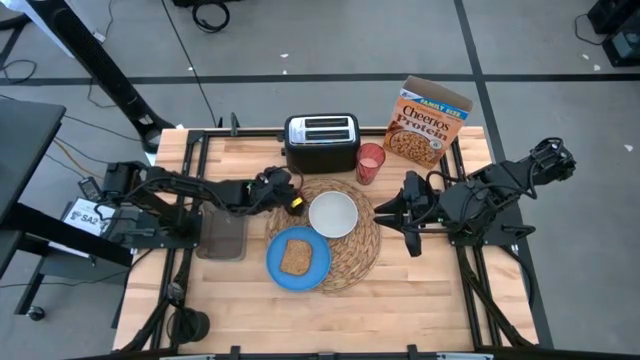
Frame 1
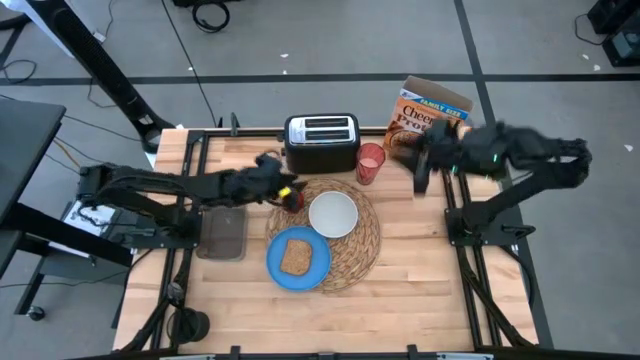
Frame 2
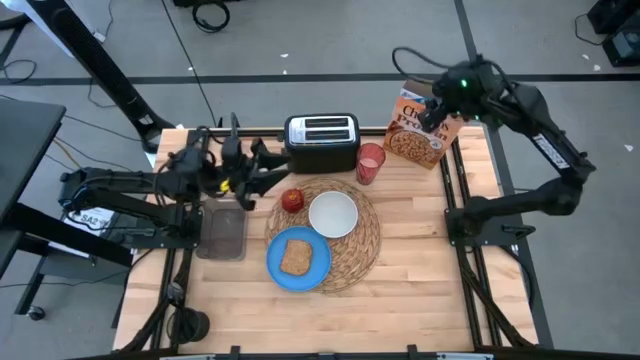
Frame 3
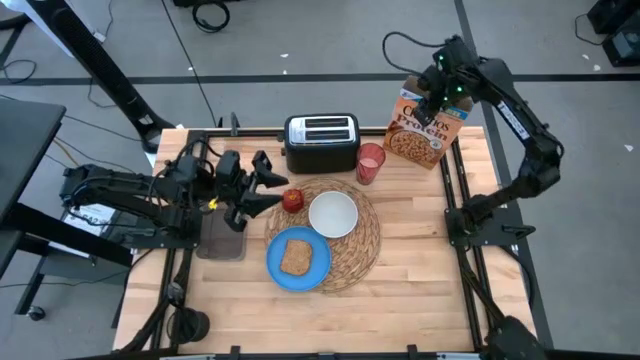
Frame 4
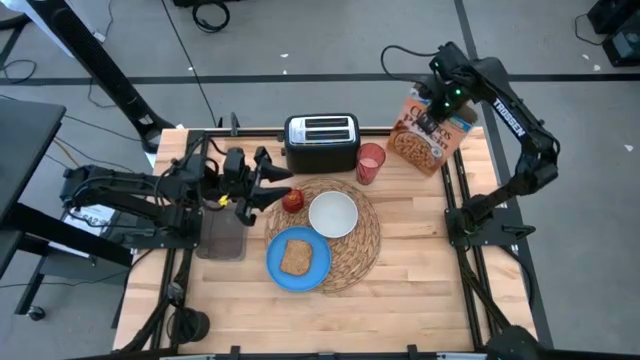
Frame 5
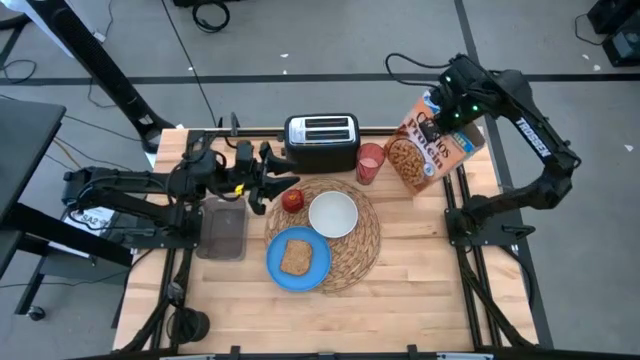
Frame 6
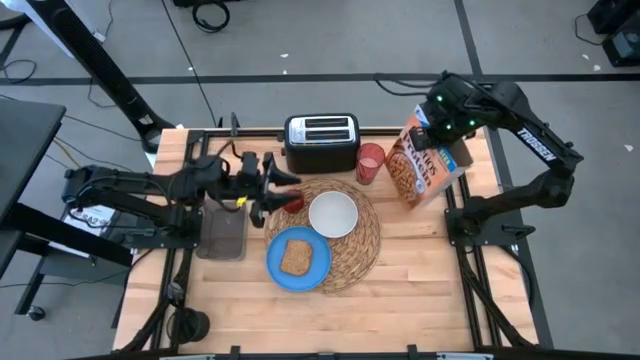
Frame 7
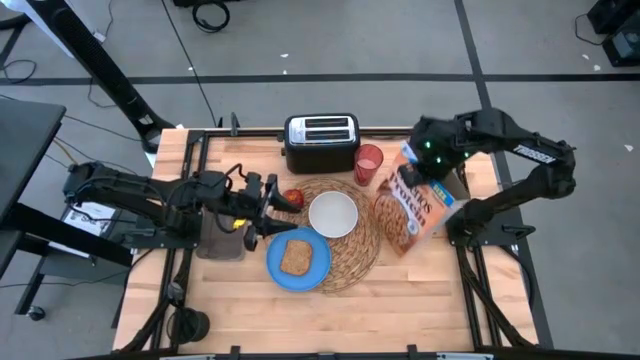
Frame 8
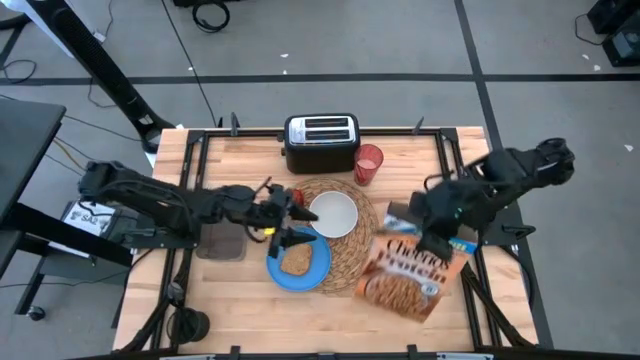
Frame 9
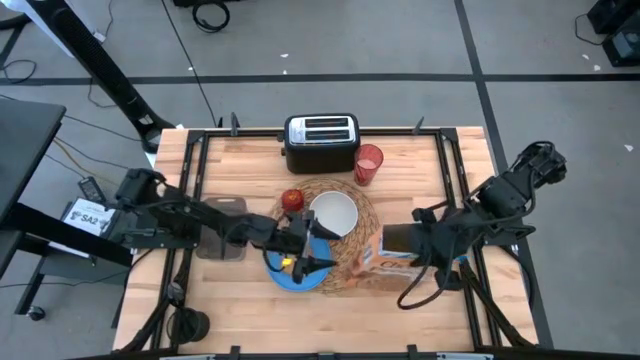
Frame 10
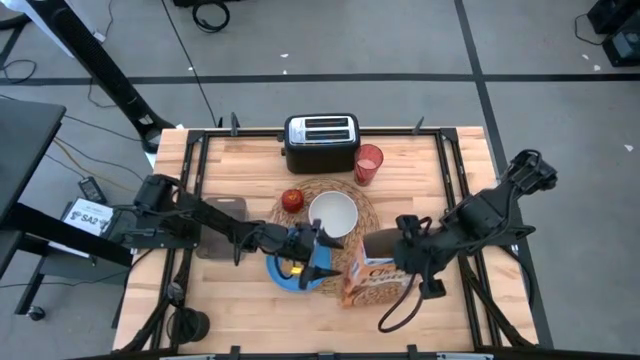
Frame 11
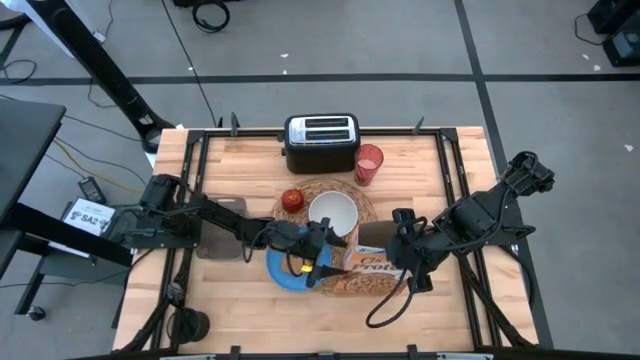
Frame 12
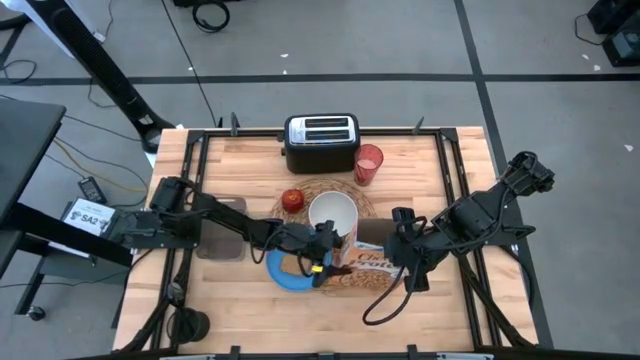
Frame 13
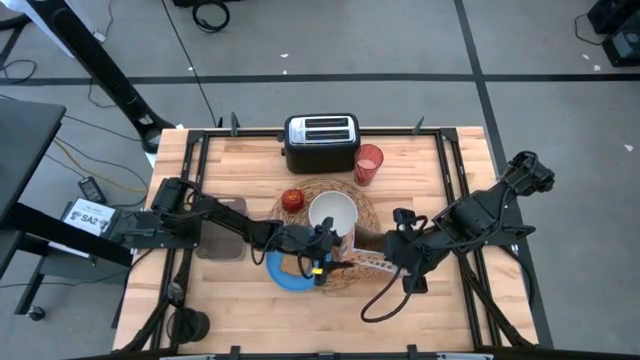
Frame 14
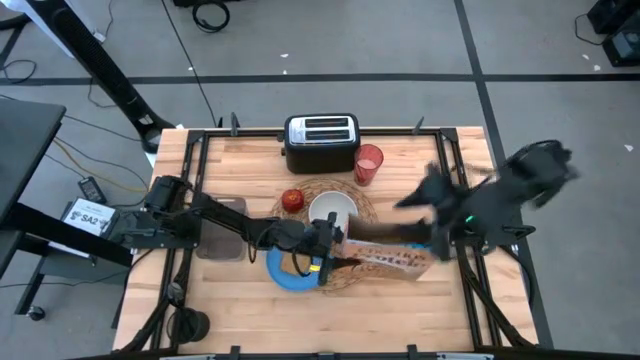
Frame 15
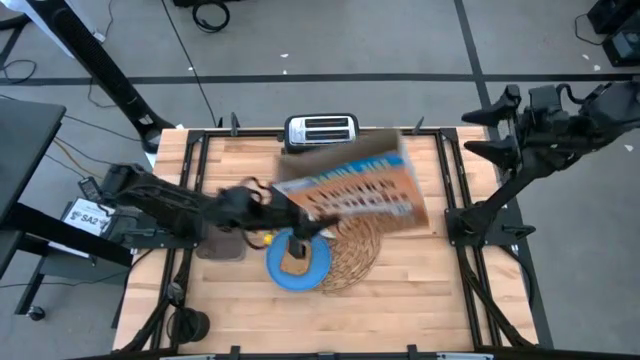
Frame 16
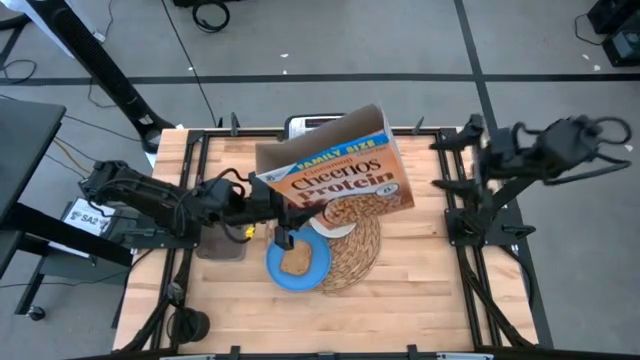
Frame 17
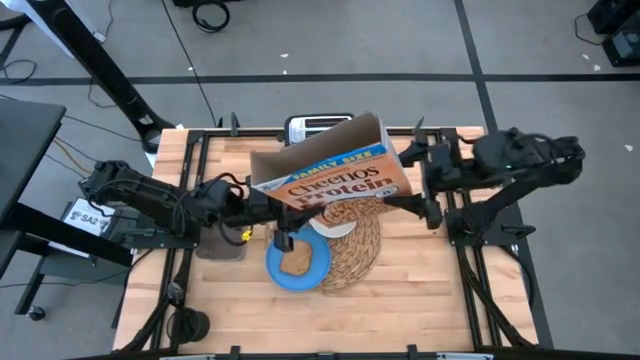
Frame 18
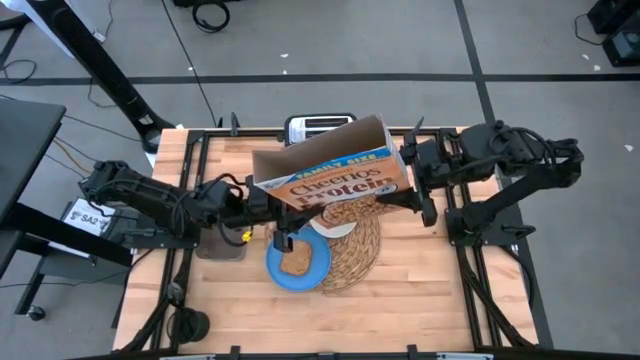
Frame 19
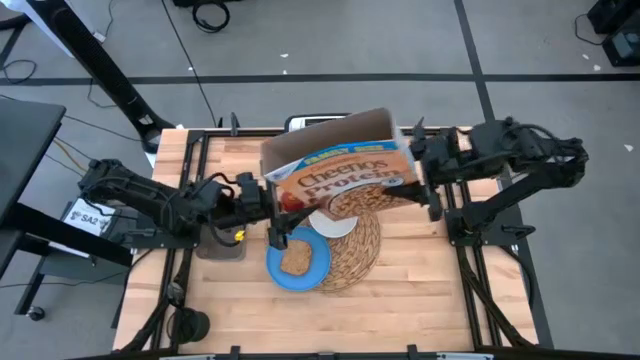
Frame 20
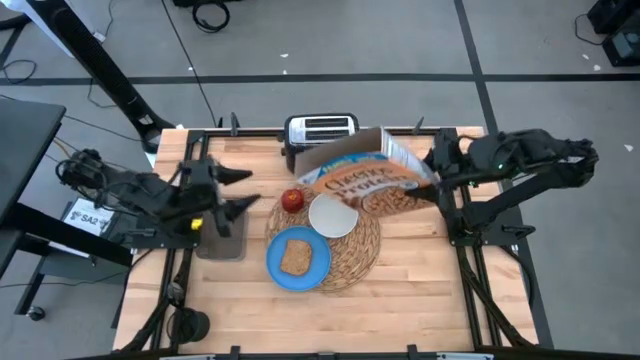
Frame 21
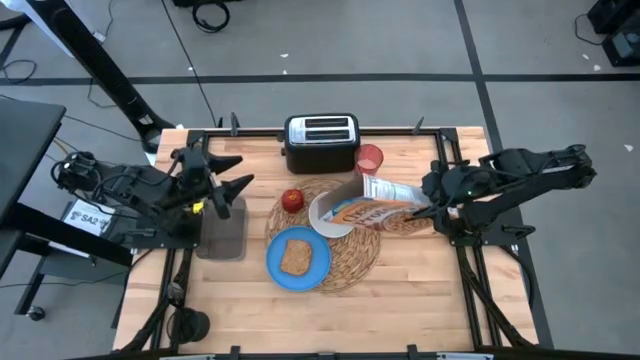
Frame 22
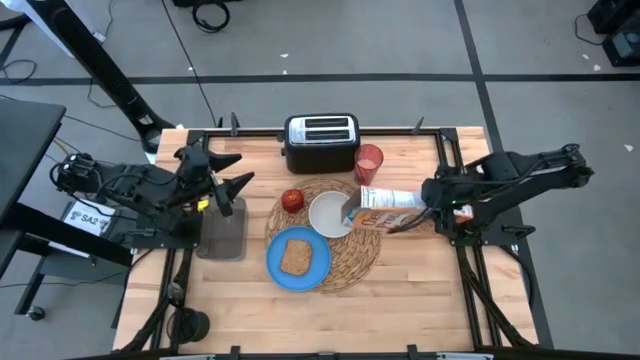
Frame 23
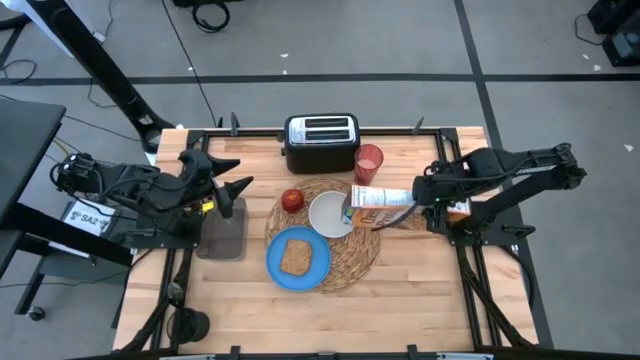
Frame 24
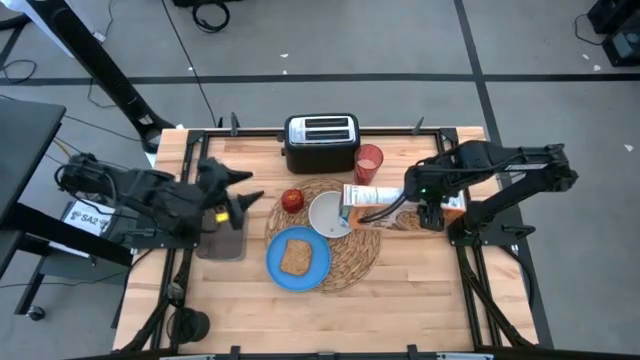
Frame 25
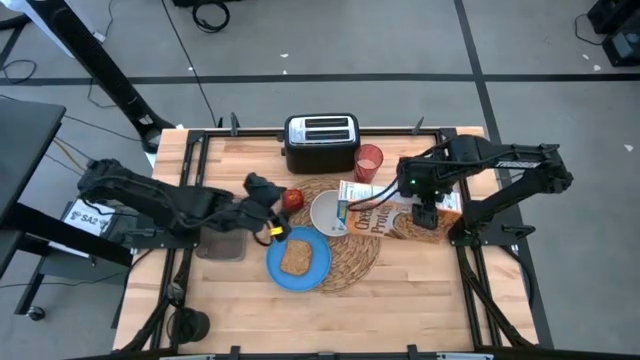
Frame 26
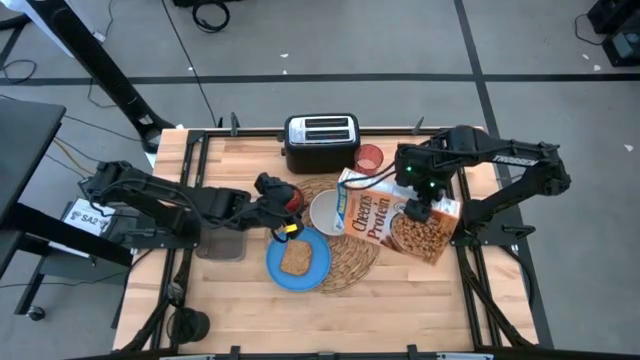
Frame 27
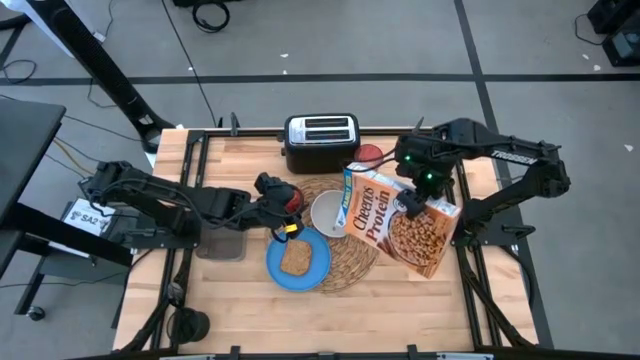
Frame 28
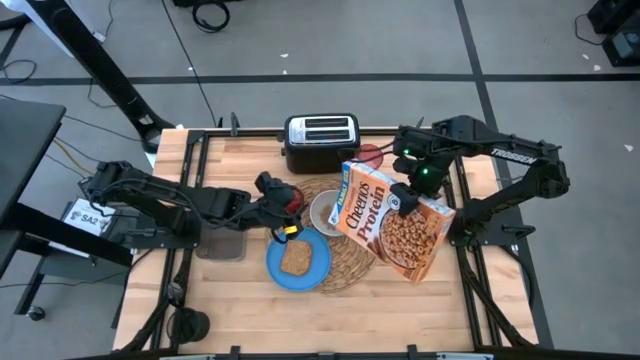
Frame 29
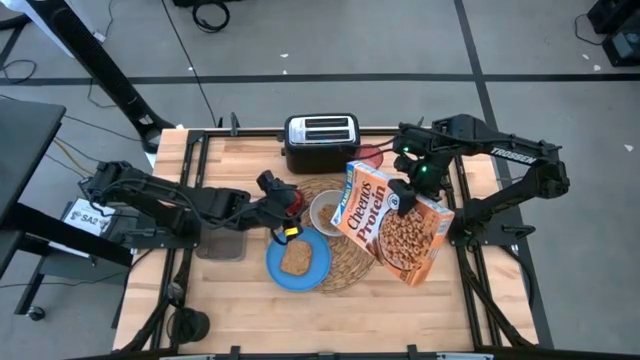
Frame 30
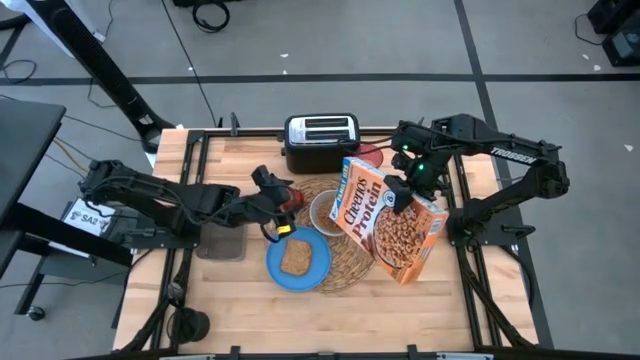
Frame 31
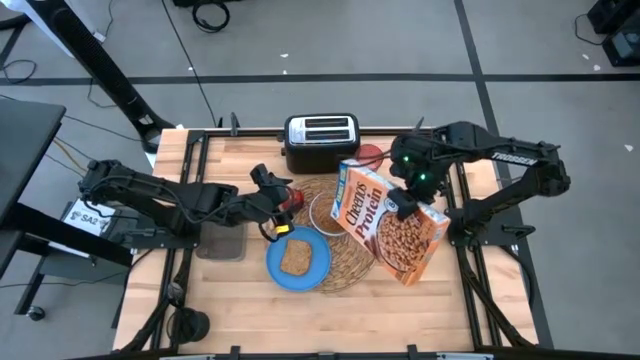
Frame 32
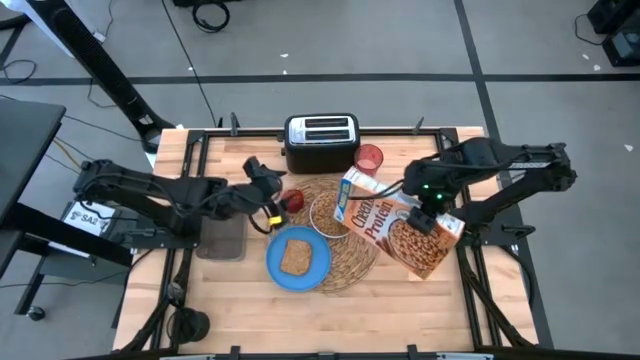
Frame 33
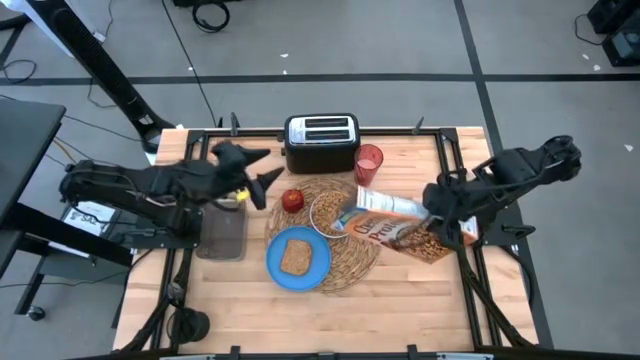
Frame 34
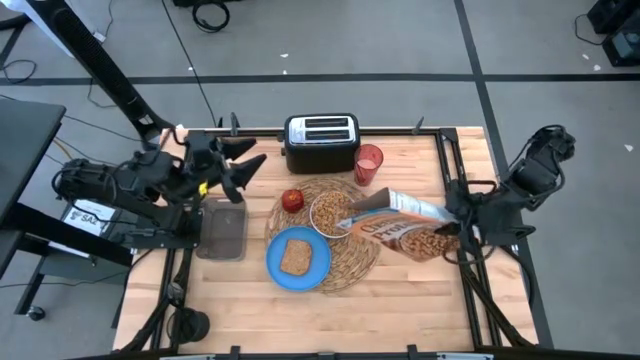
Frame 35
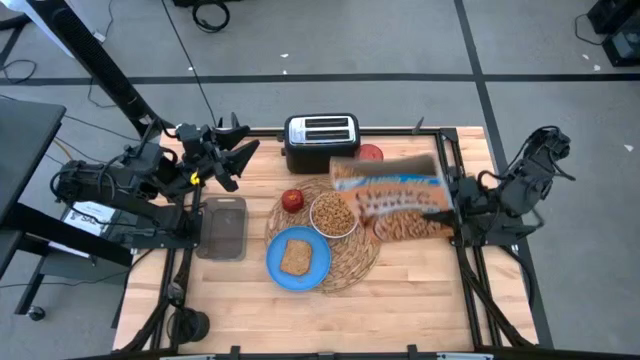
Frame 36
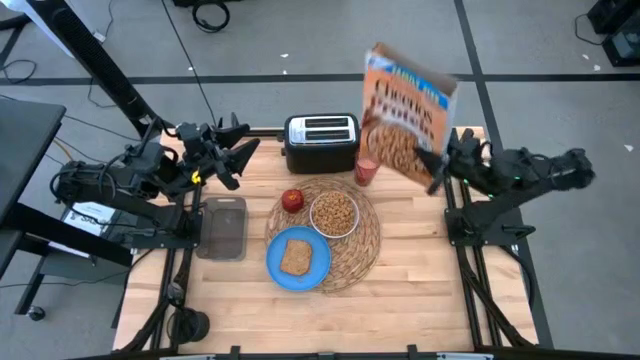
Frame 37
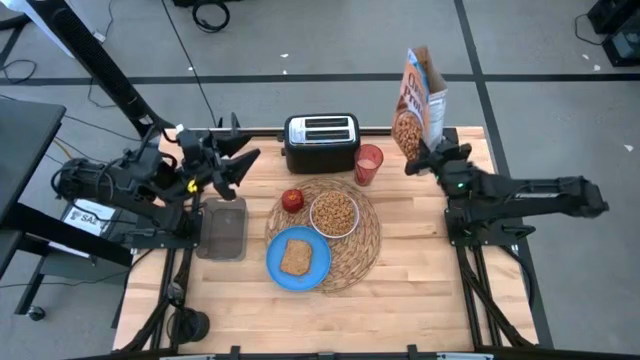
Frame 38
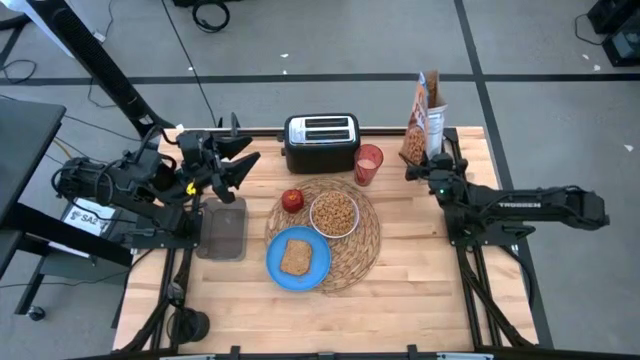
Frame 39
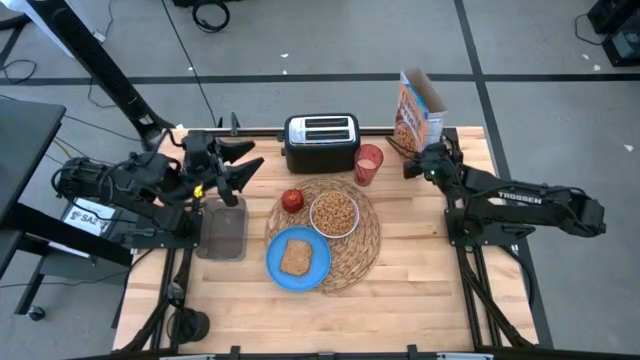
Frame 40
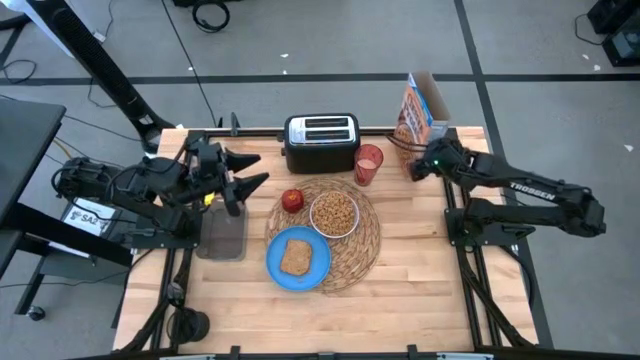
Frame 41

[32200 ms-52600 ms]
Task: Arrange a breakfast setting
Pour the cereal from the orange cereal box into the white bowl
